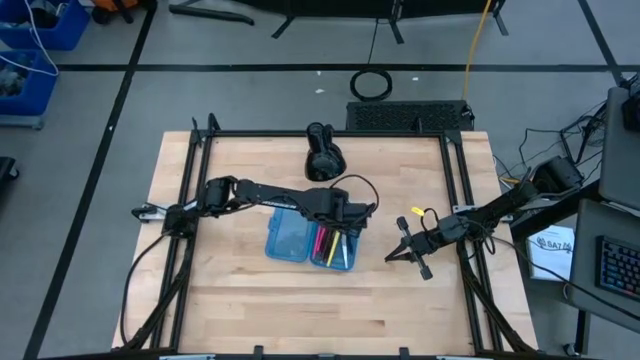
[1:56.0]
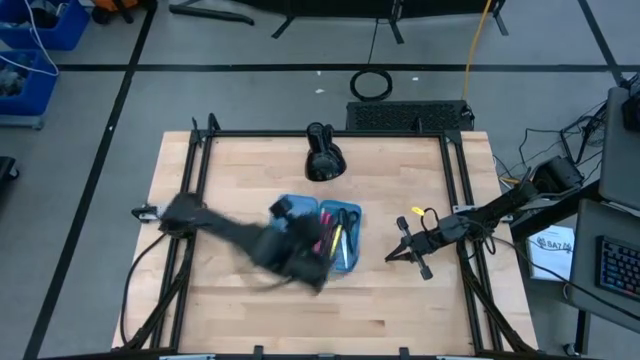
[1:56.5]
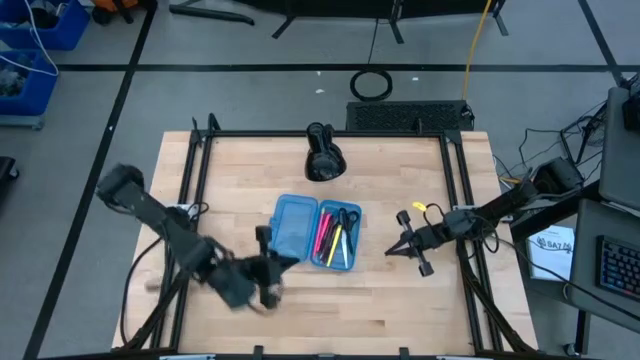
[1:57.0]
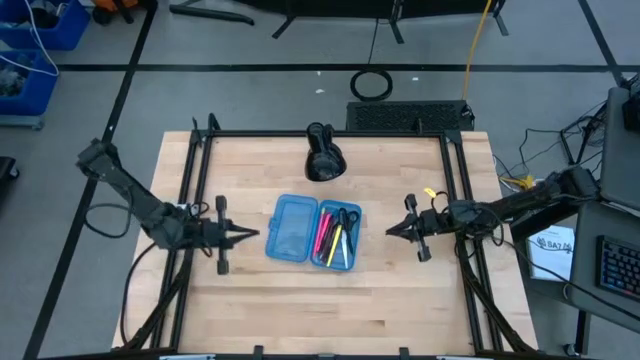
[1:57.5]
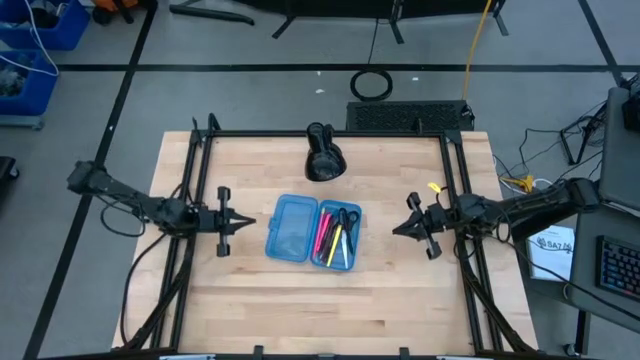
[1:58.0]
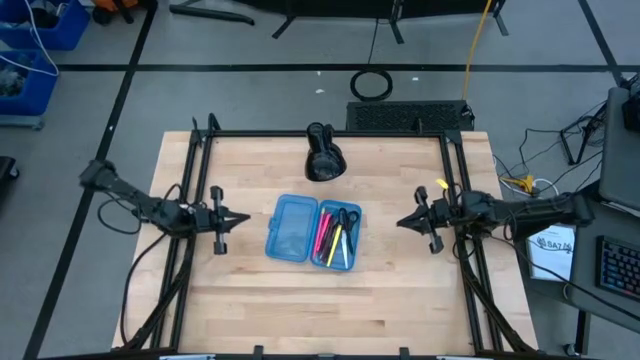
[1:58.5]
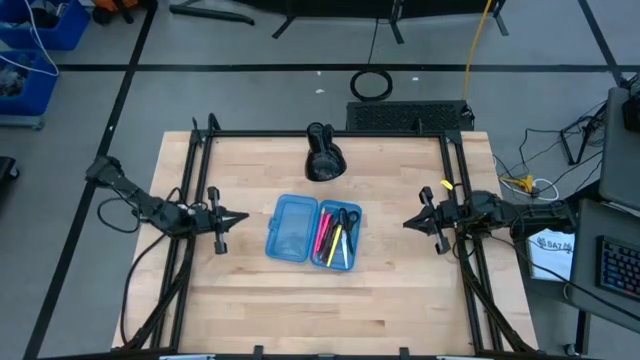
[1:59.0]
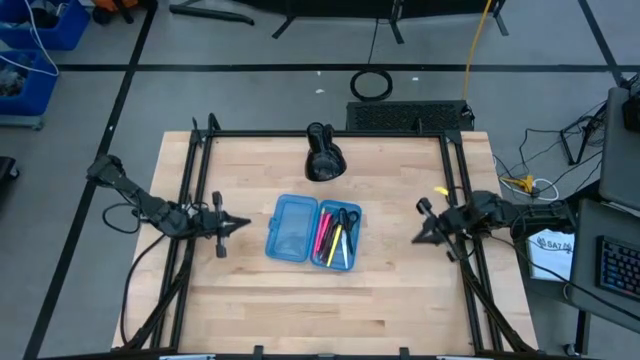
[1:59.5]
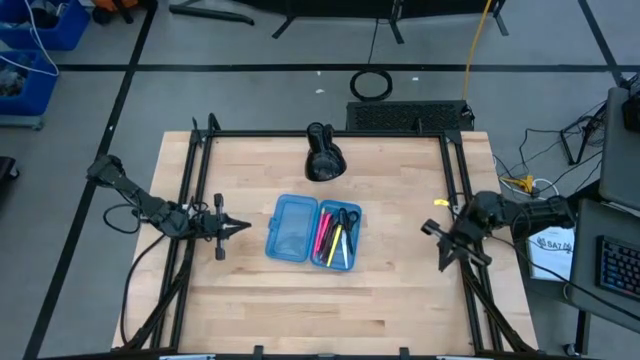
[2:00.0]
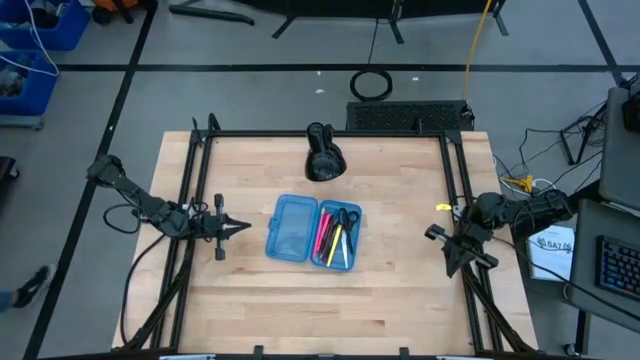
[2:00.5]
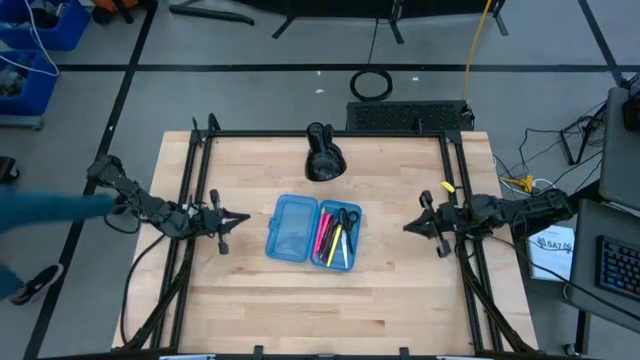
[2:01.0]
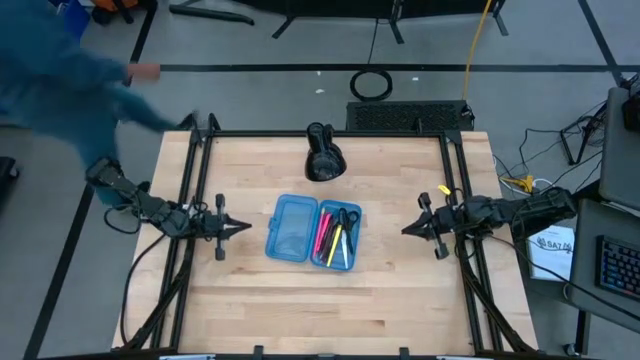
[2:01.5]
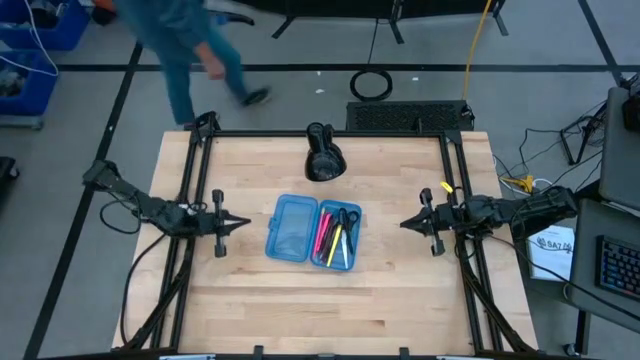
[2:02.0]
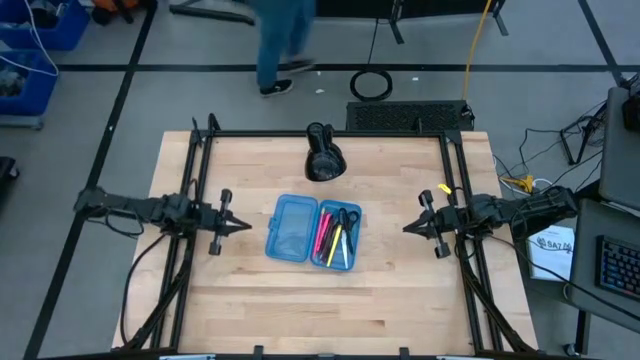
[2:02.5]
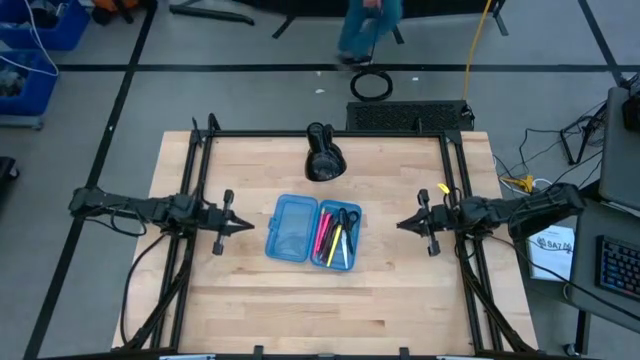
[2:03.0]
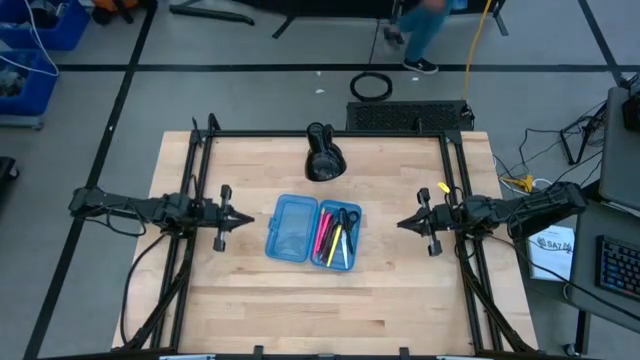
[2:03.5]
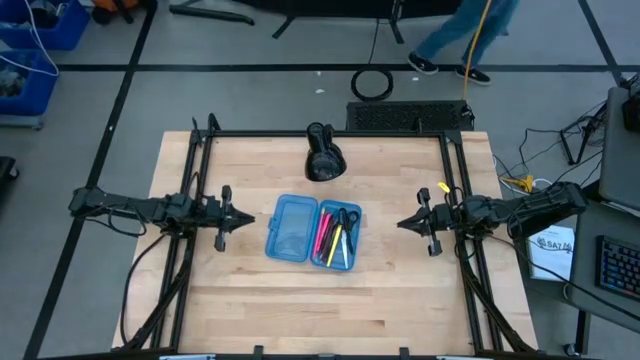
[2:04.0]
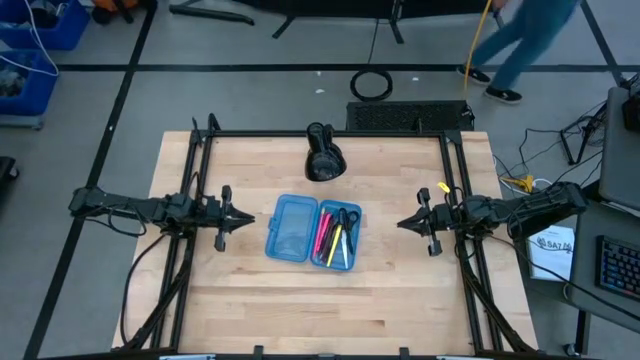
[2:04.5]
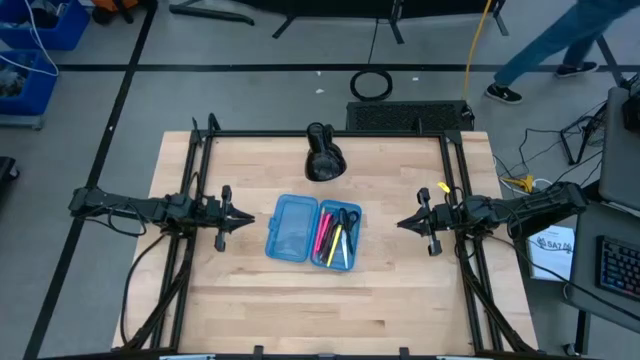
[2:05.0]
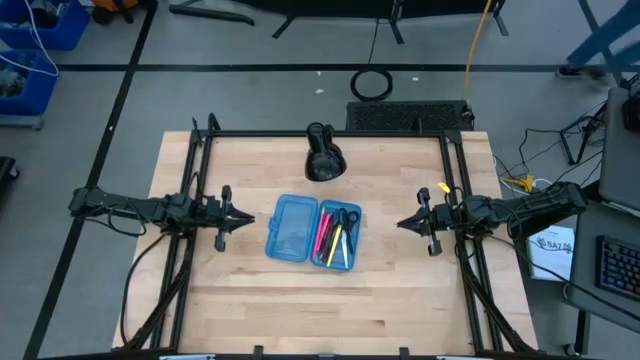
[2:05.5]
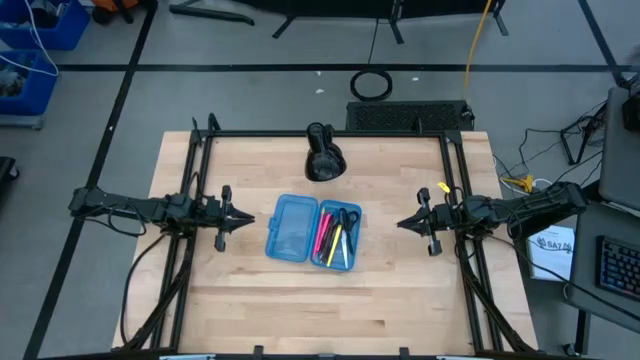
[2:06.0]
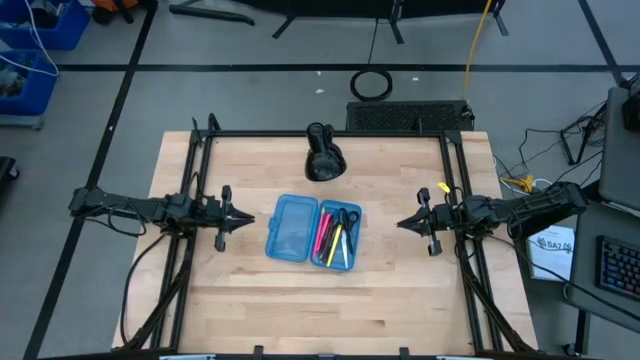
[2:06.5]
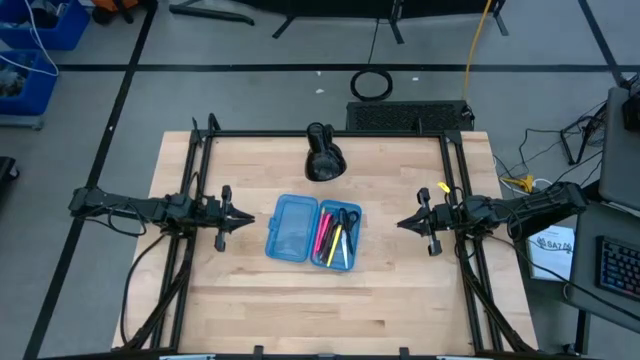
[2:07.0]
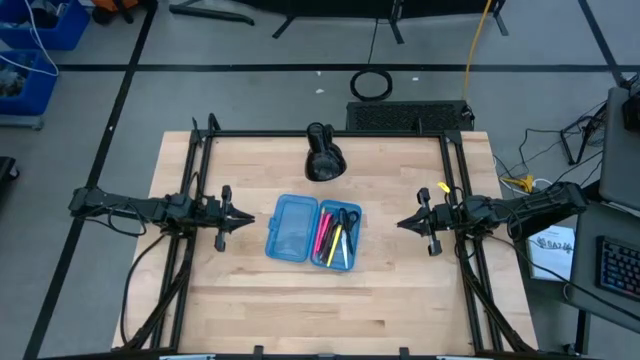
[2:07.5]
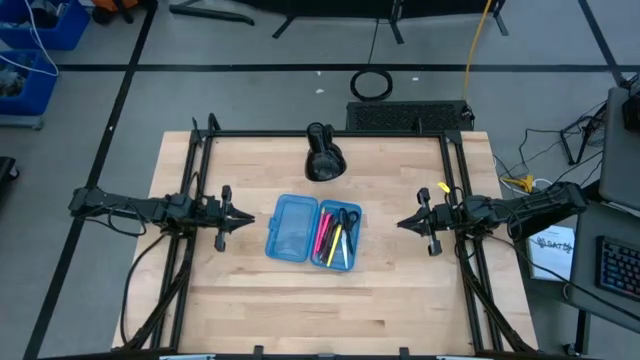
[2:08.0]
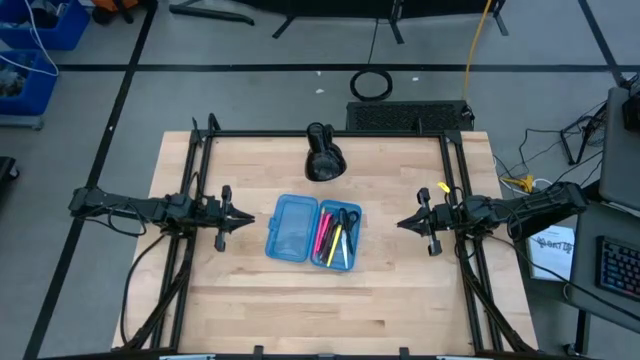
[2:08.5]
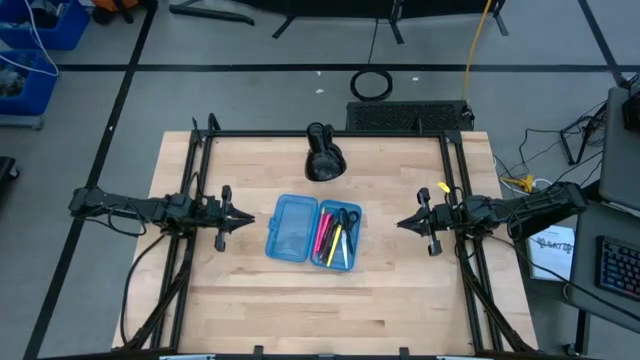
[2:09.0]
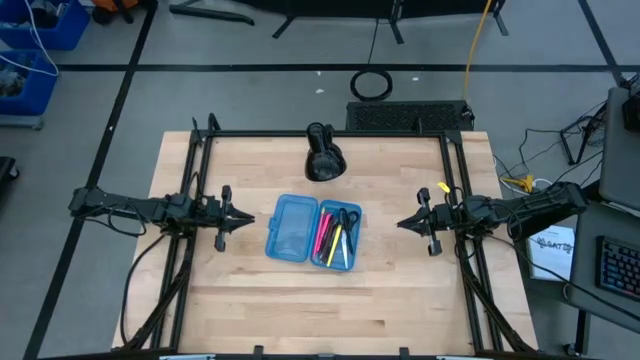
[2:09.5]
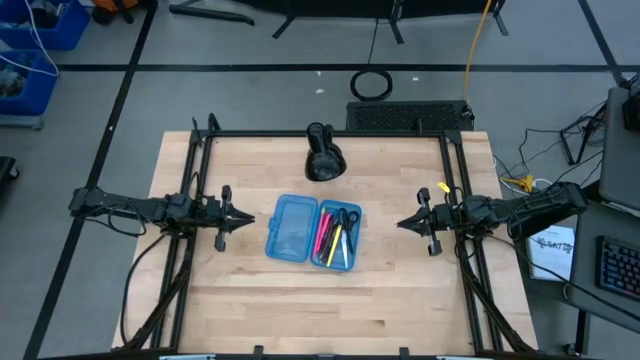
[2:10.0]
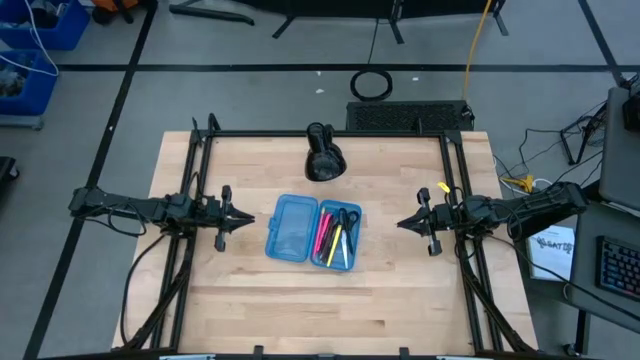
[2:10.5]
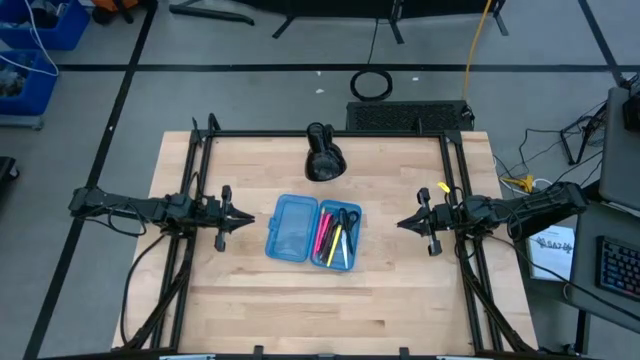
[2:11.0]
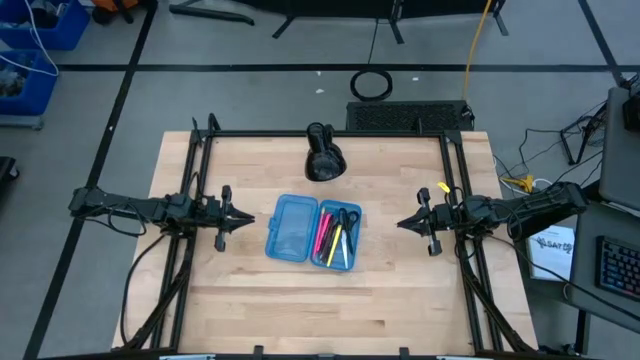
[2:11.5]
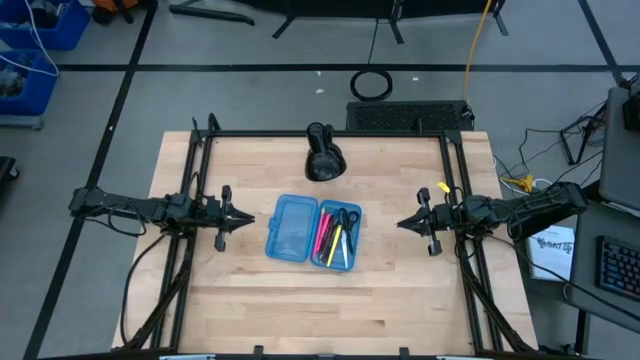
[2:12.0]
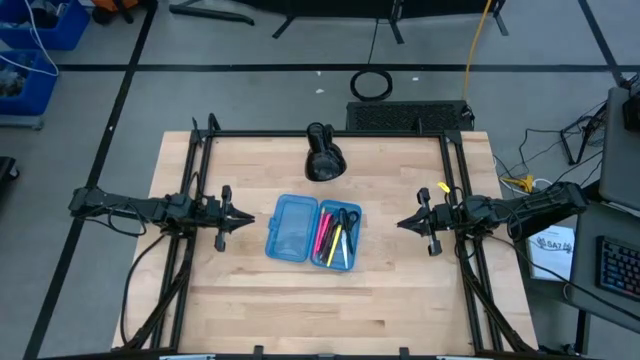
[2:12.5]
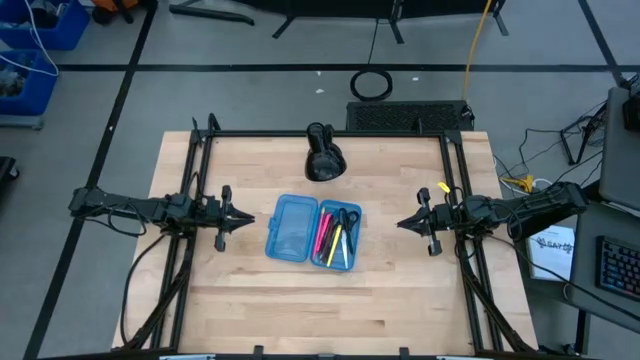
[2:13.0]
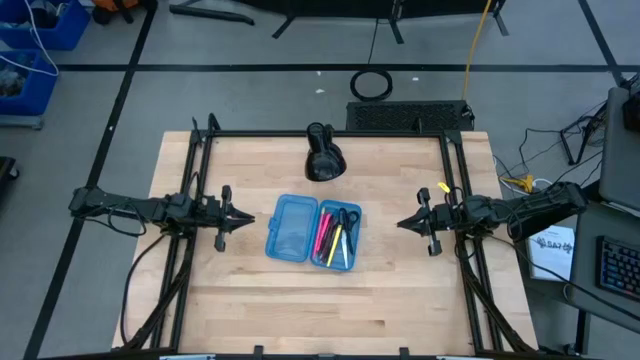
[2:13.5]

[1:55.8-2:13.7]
Task: Pick & place school supplies into a supply box
Return to Home Position
